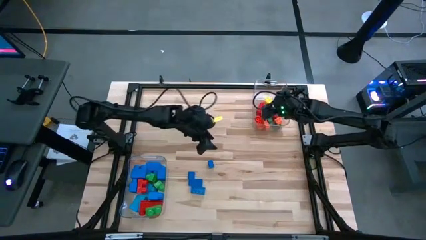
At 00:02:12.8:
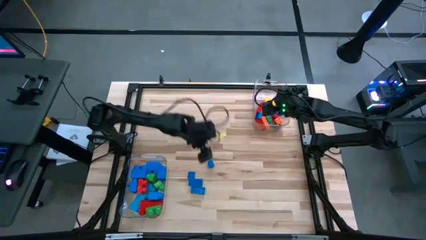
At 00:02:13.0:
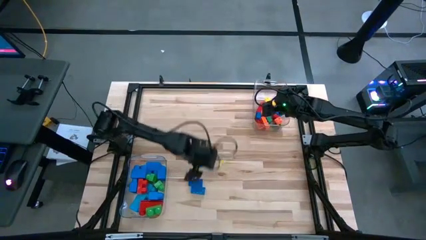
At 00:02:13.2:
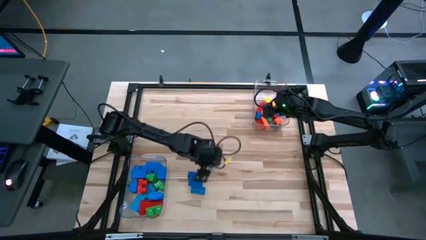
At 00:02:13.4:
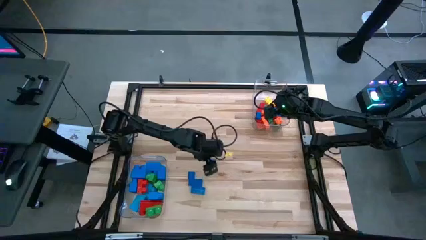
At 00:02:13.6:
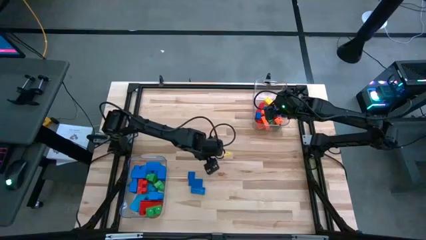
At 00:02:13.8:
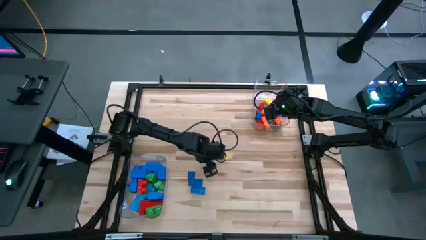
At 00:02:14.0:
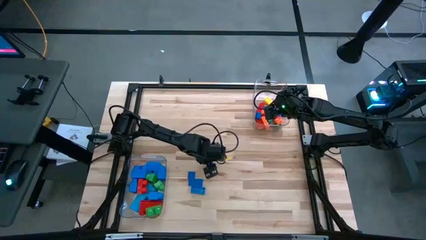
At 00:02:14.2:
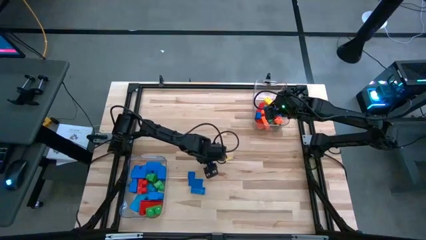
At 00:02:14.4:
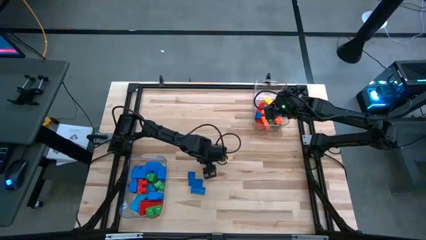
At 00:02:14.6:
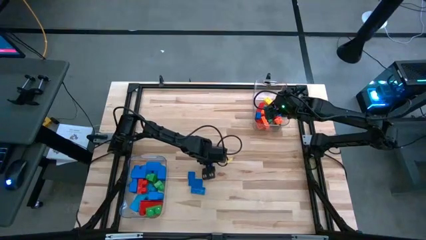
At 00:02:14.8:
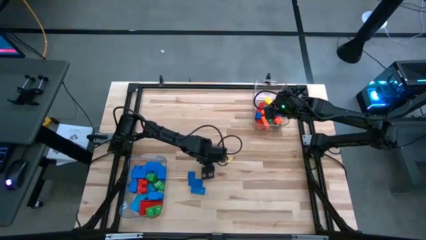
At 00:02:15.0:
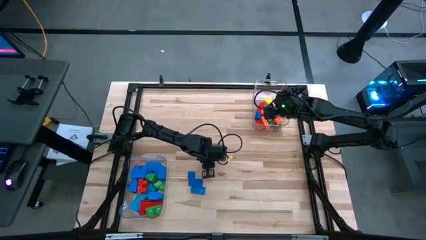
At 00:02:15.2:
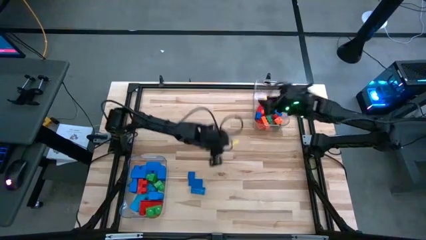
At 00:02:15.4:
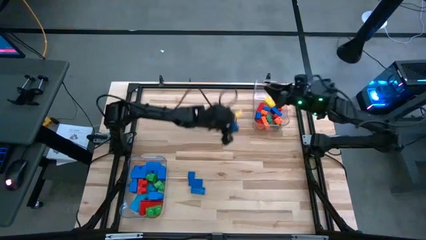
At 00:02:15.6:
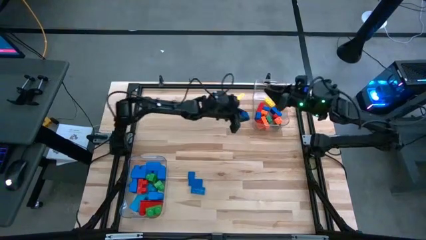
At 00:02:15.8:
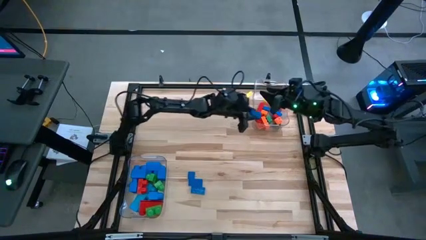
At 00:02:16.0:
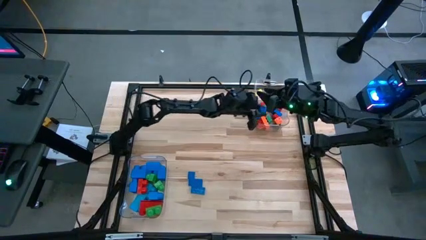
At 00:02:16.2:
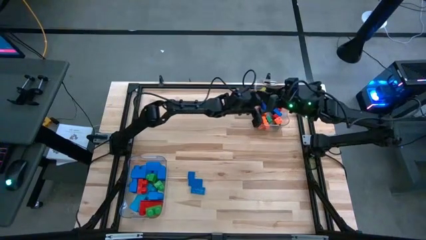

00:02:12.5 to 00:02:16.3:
Task: Sort blocks by size
Put the small blue game piece into the top transparent bin

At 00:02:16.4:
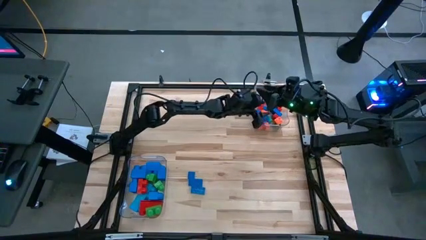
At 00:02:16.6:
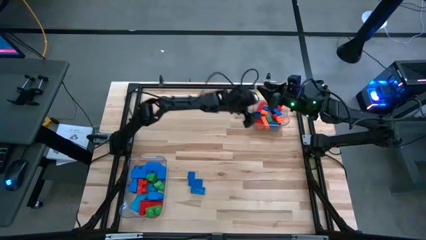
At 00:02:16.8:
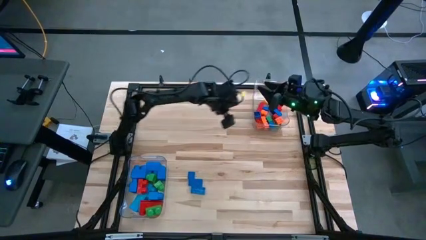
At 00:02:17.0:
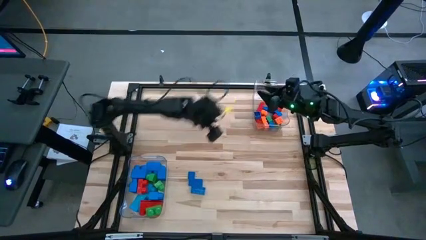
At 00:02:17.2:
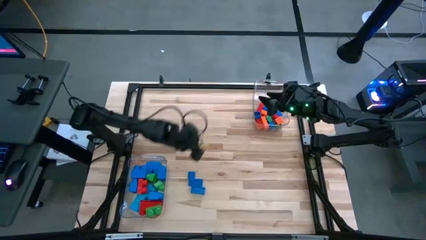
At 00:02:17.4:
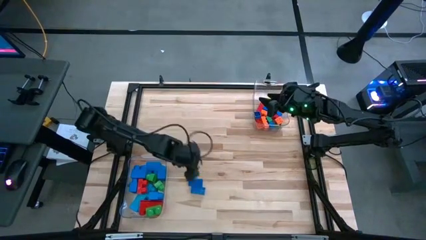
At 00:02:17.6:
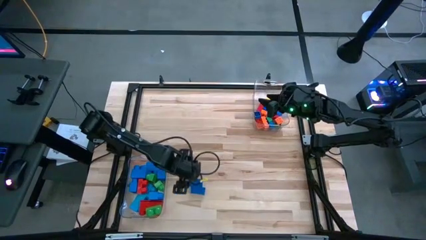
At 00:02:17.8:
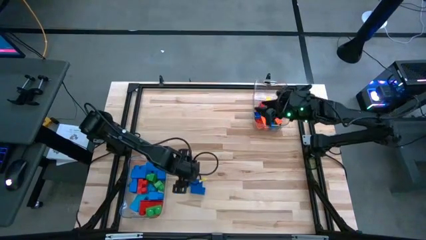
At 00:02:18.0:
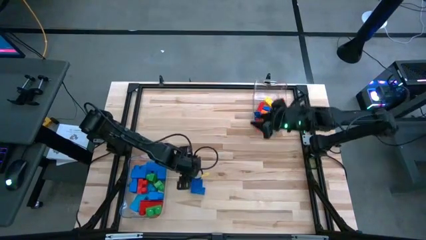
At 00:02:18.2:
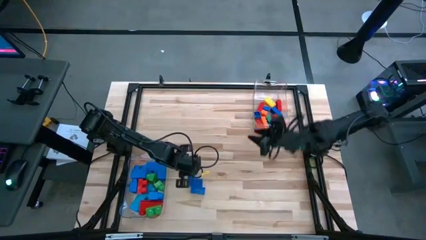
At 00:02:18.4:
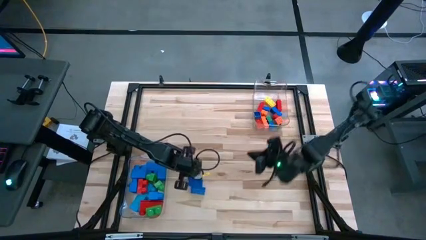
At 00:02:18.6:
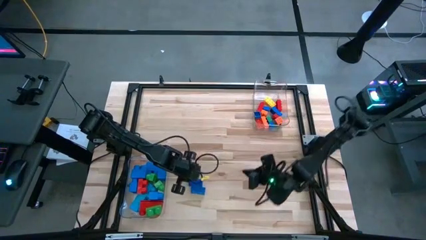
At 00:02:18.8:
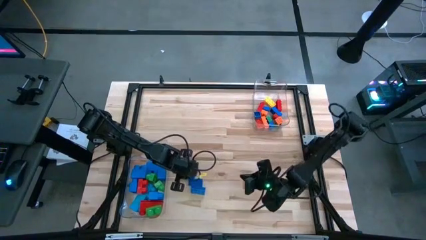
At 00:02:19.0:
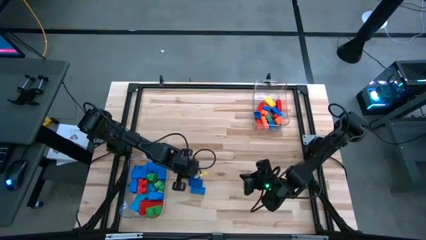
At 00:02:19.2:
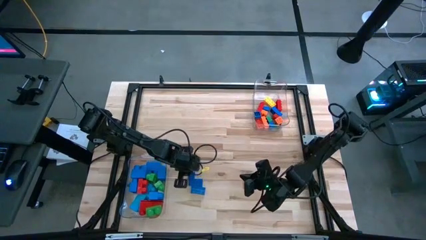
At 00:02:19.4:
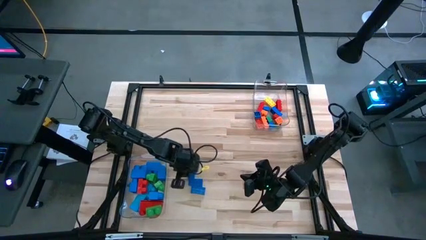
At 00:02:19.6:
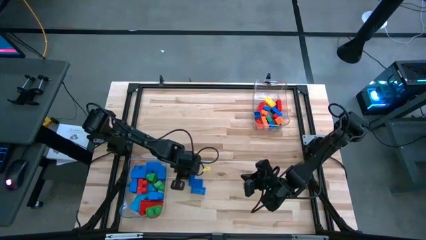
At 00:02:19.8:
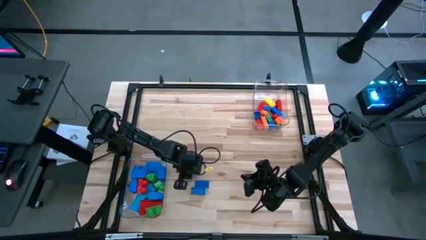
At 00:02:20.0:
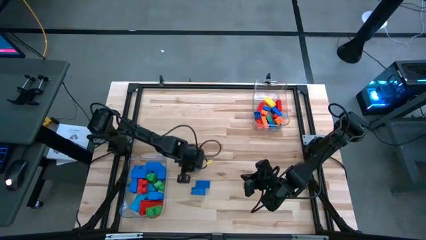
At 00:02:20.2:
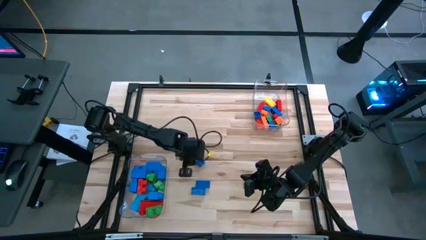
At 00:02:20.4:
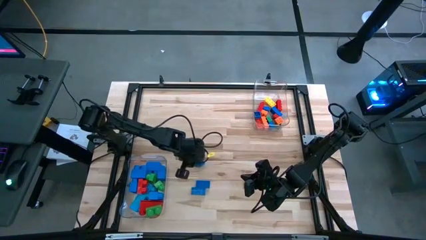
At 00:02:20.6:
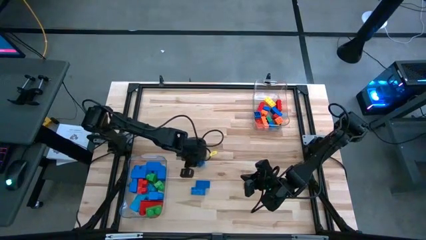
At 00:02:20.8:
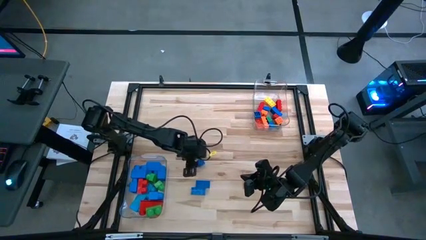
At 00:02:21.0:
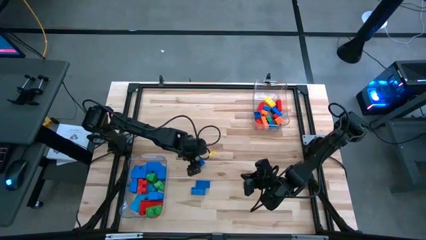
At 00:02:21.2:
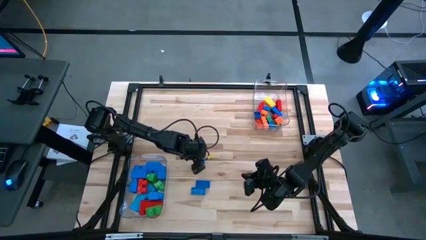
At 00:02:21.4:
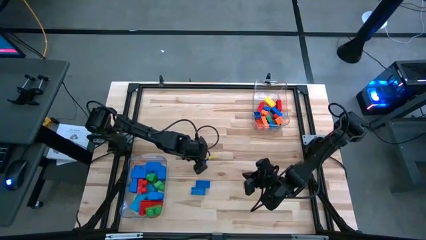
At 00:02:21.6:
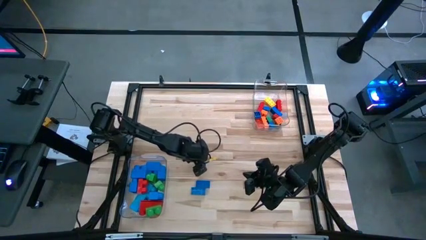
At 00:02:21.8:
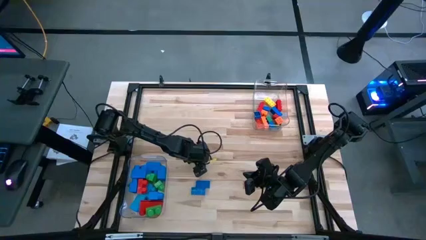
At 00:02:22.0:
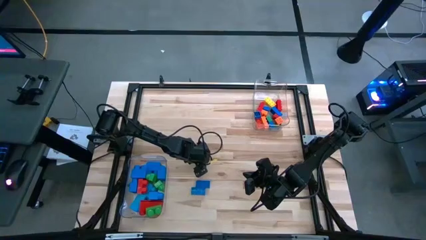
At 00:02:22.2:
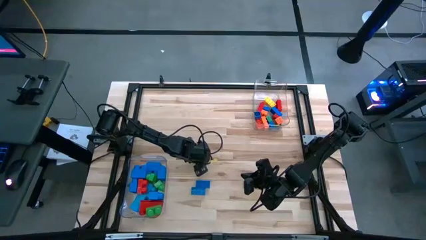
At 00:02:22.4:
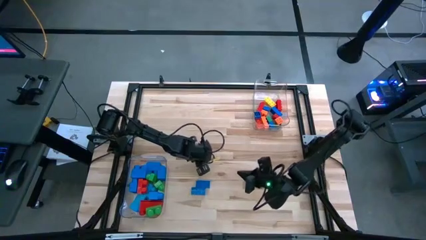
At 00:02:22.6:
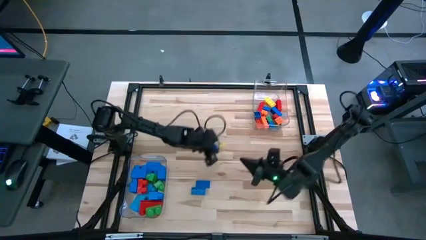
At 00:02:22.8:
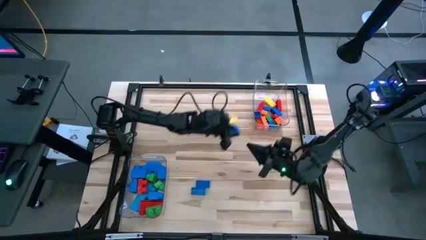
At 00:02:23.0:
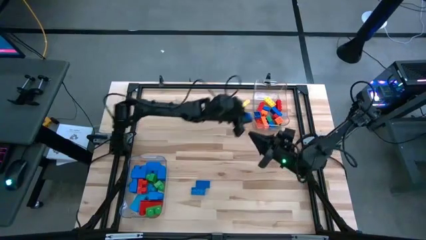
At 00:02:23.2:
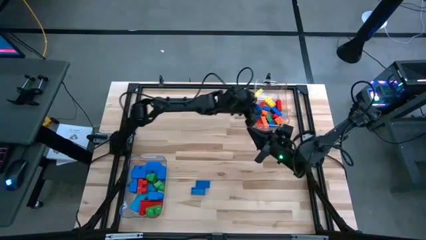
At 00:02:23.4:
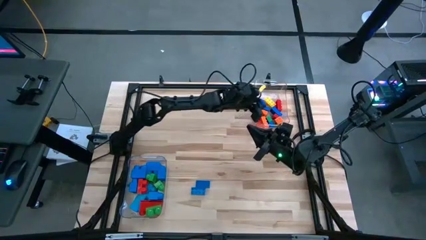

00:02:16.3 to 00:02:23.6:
Put the small blue game piece into the top transparent bin

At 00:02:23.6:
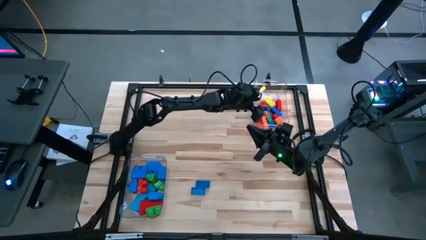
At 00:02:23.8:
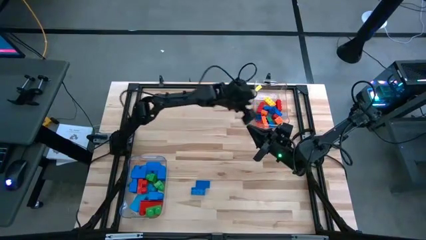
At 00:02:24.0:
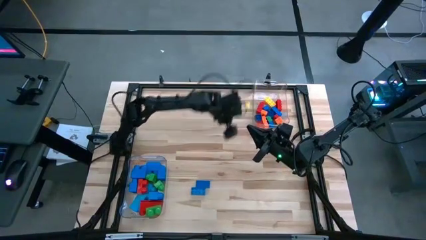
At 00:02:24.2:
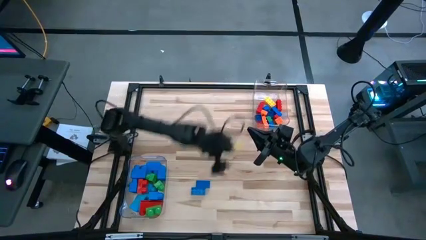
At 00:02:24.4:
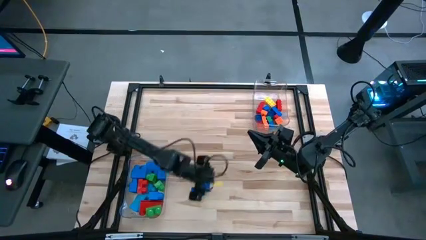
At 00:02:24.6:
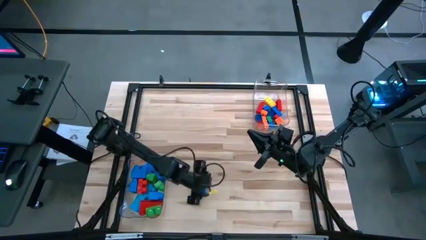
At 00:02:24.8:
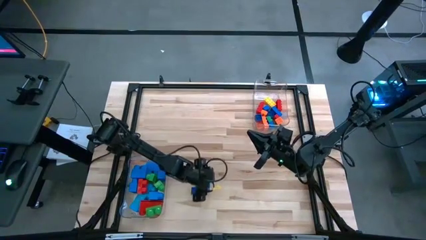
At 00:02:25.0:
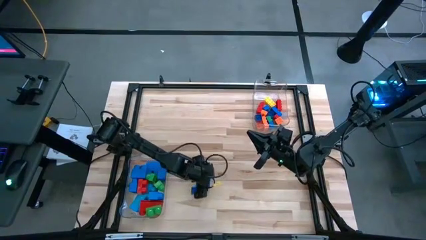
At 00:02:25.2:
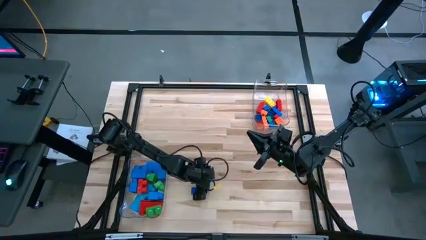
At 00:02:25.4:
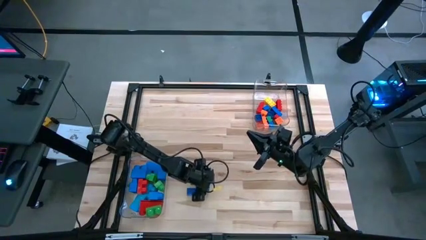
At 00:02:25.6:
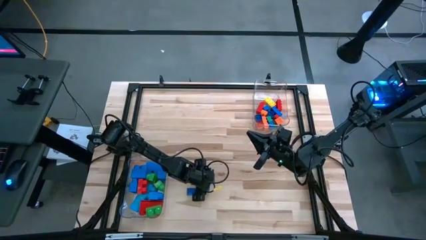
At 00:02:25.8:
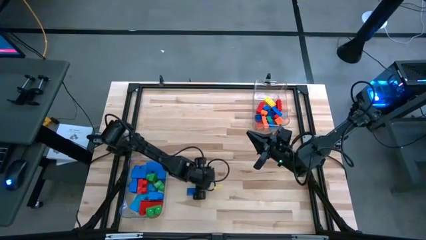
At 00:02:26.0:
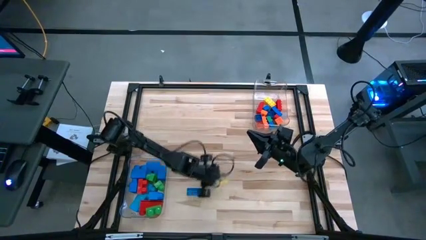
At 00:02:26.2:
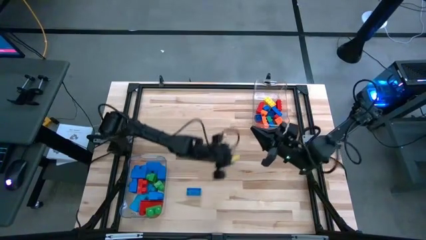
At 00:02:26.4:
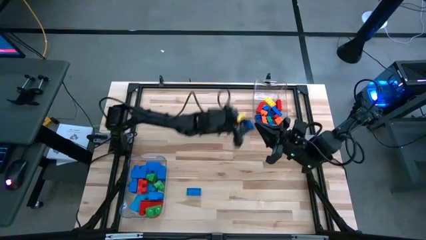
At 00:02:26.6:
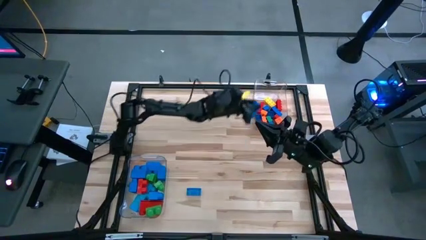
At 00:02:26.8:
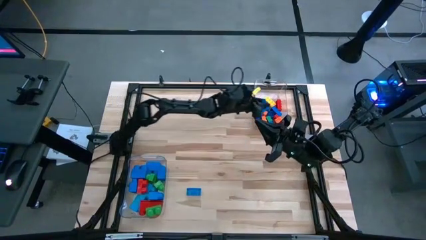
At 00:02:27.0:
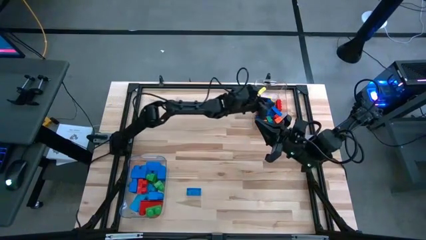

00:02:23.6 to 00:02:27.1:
Put the small blue game piece into the top transparent bin

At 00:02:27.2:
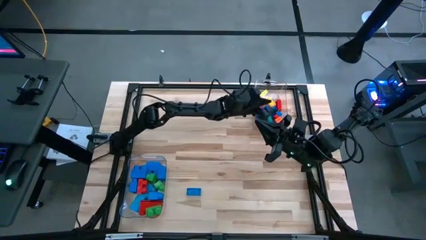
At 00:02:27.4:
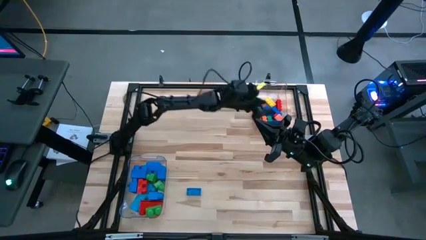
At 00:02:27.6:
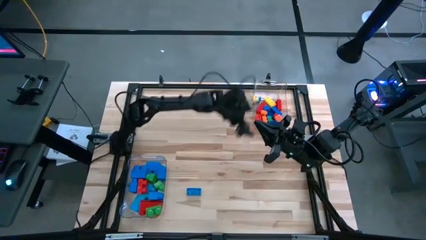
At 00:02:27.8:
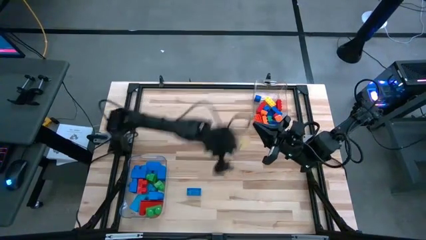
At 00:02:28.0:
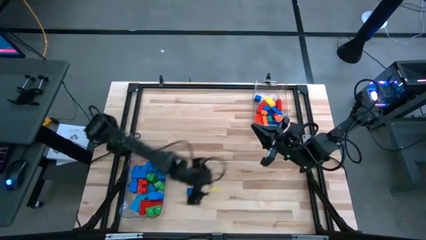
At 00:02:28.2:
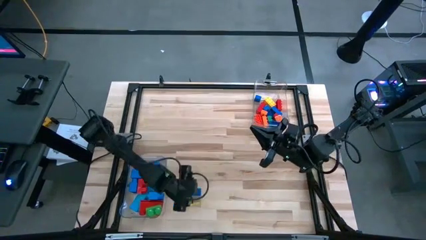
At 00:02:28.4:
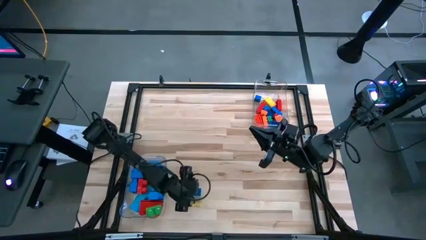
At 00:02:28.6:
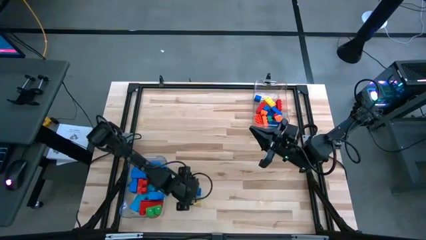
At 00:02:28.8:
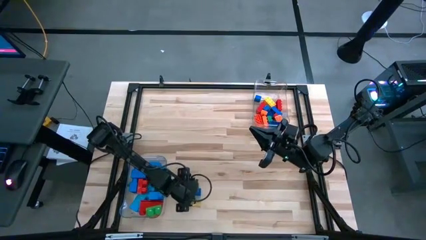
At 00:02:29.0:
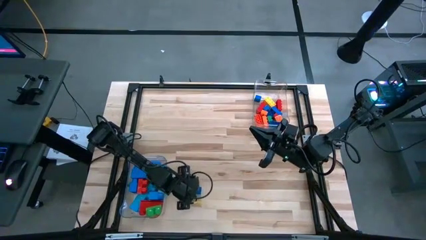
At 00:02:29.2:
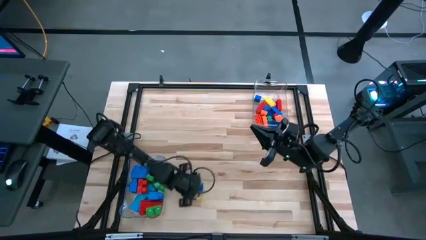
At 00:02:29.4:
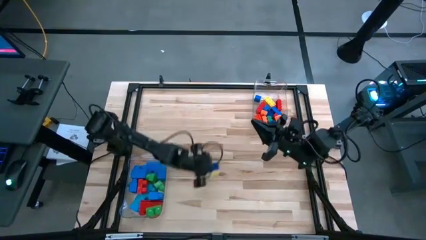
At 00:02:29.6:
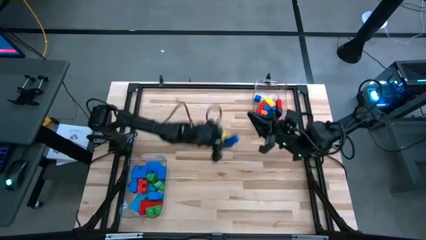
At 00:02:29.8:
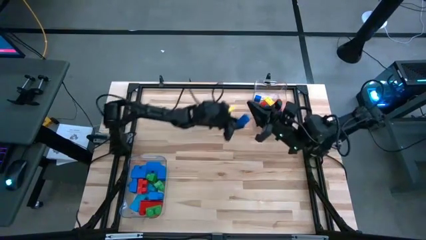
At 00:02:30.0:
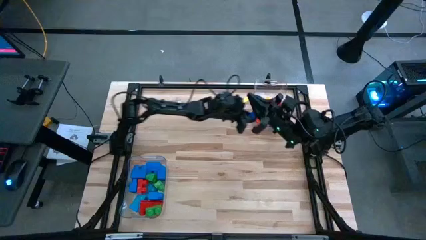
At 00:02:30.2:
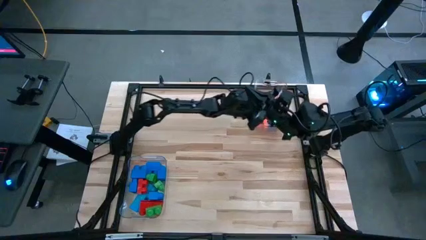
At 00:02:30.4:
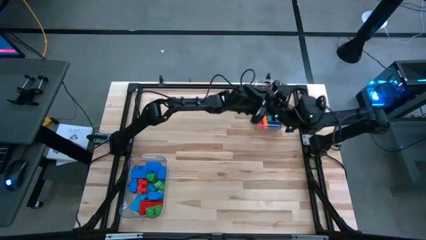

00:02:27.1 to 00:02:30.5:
Put the small blue game piece into the top transparent bin
